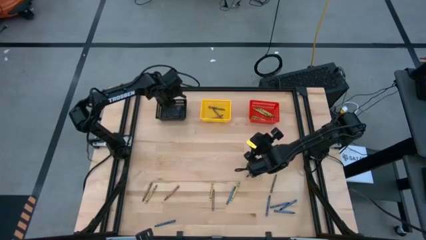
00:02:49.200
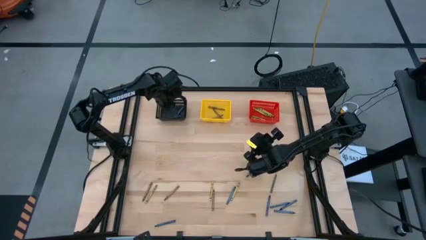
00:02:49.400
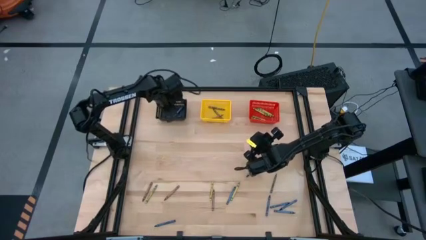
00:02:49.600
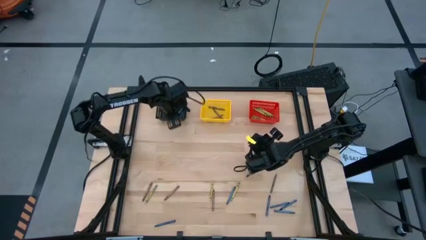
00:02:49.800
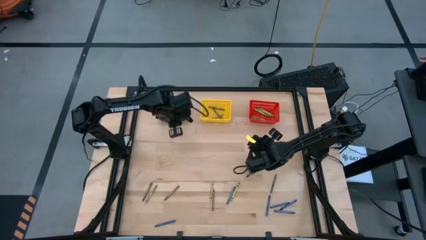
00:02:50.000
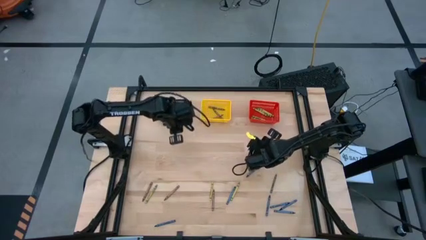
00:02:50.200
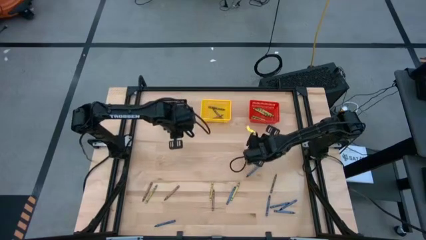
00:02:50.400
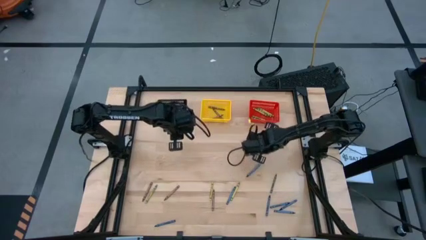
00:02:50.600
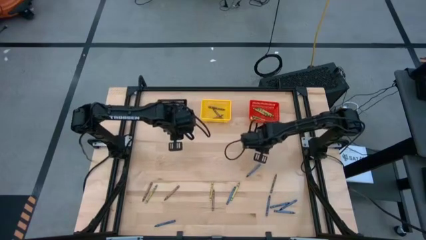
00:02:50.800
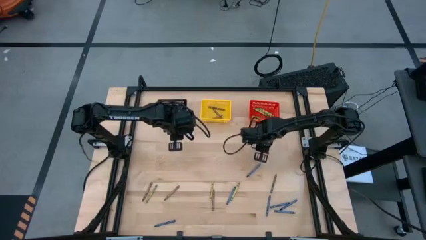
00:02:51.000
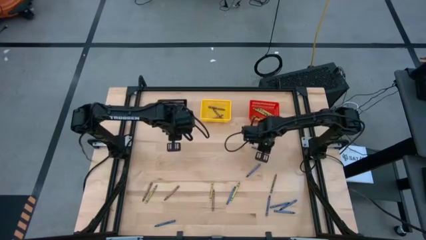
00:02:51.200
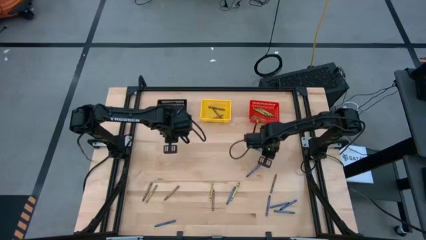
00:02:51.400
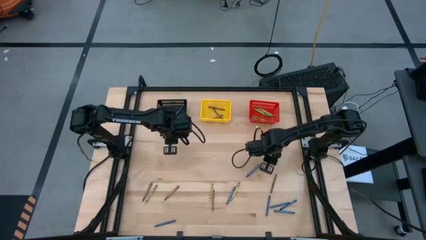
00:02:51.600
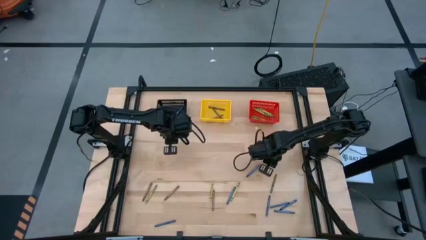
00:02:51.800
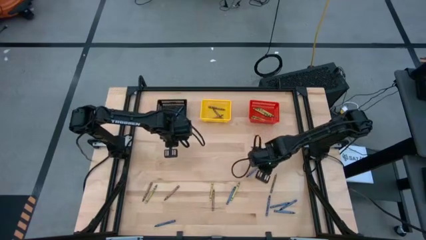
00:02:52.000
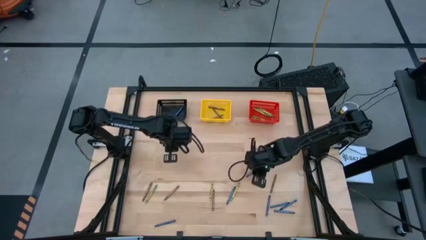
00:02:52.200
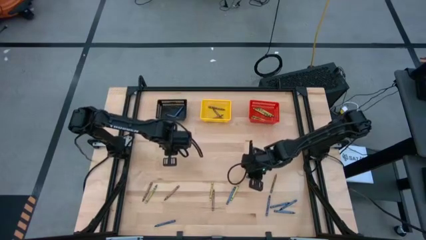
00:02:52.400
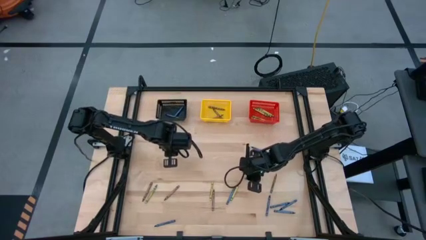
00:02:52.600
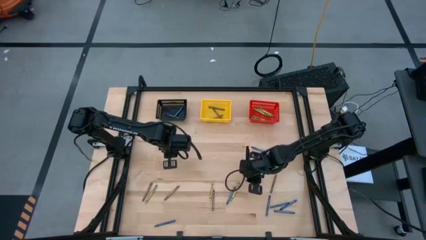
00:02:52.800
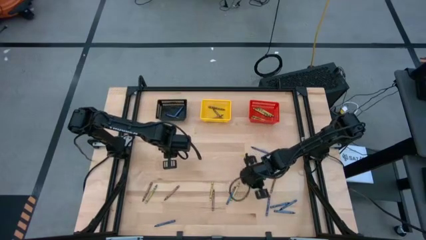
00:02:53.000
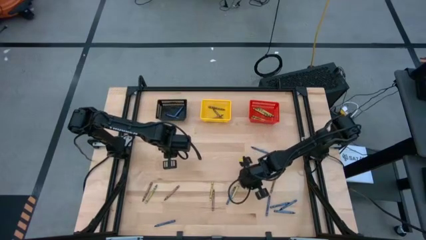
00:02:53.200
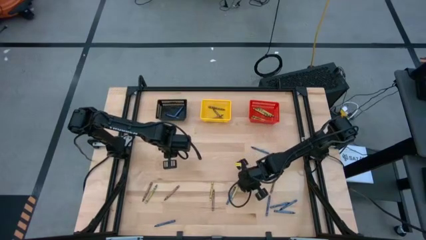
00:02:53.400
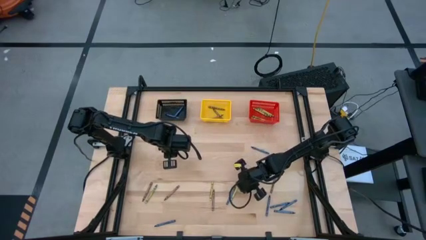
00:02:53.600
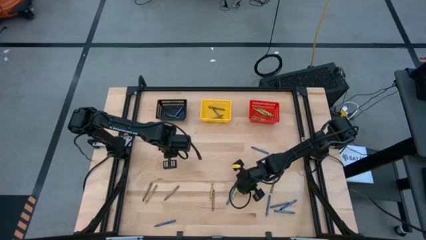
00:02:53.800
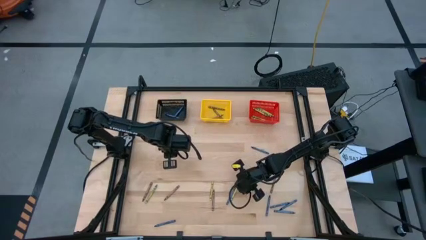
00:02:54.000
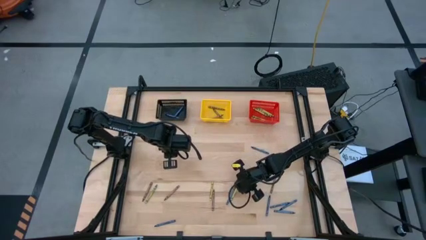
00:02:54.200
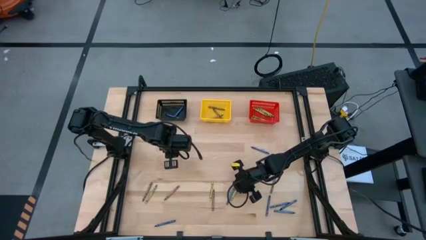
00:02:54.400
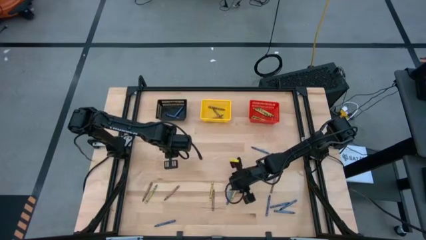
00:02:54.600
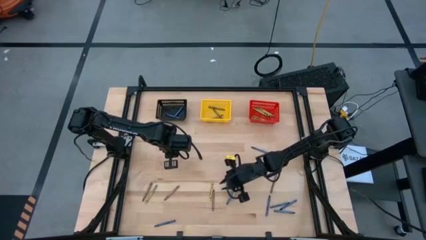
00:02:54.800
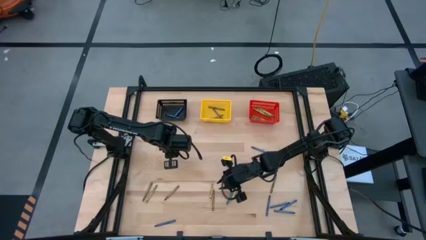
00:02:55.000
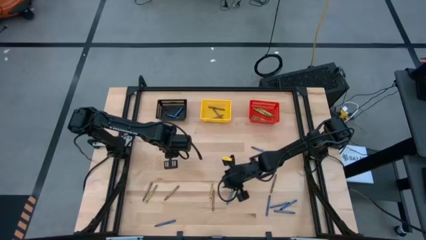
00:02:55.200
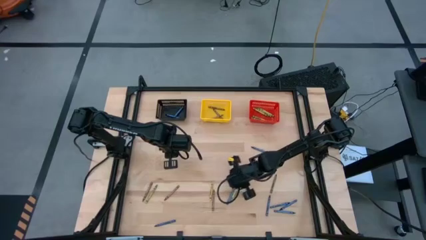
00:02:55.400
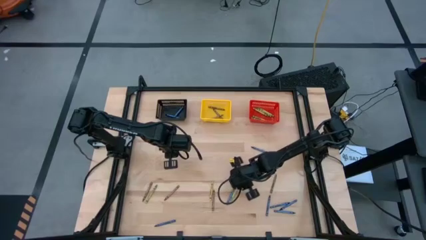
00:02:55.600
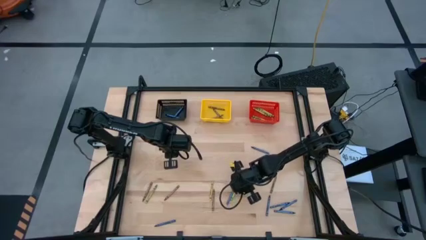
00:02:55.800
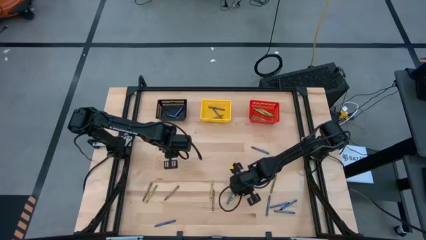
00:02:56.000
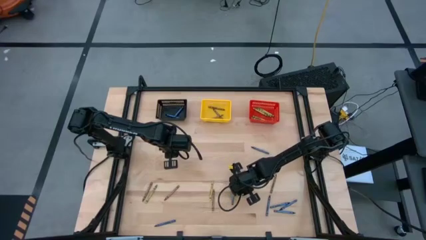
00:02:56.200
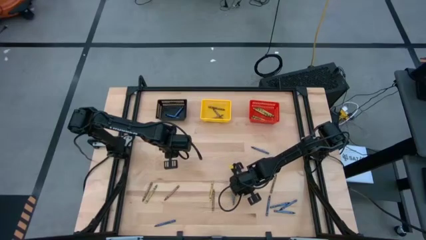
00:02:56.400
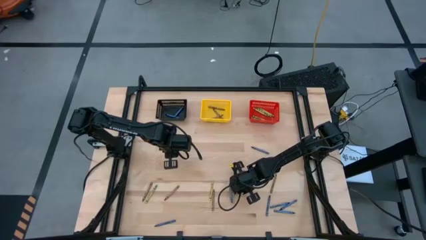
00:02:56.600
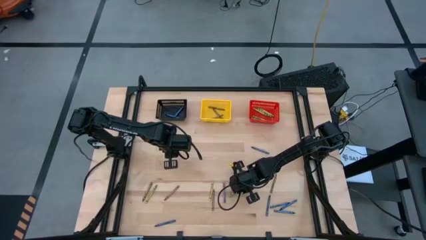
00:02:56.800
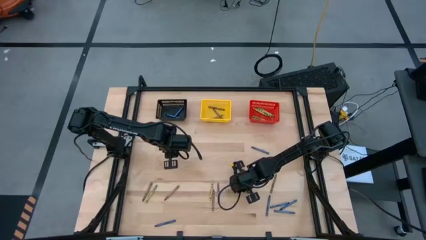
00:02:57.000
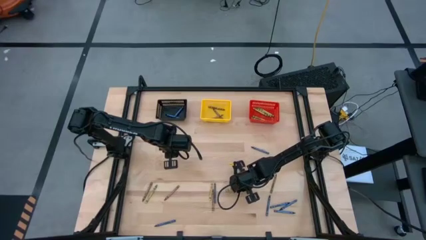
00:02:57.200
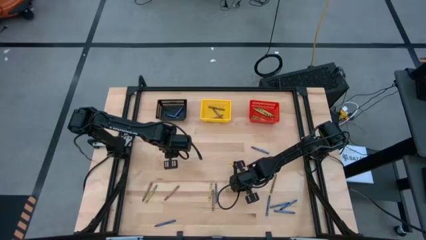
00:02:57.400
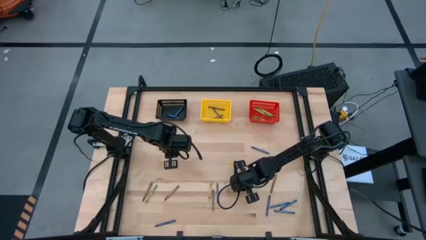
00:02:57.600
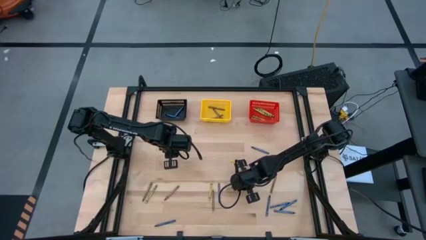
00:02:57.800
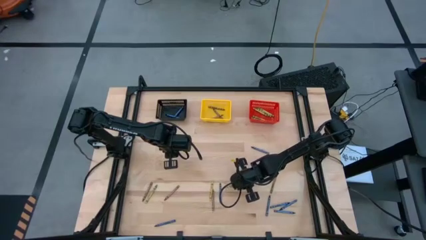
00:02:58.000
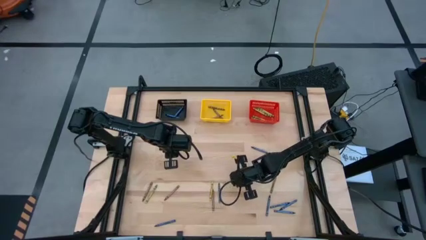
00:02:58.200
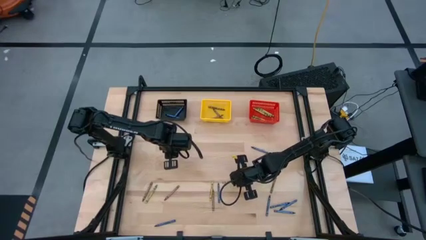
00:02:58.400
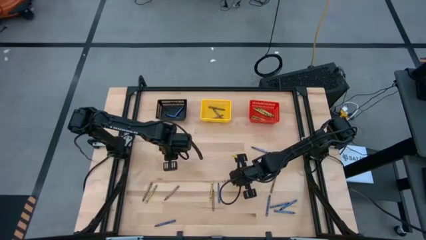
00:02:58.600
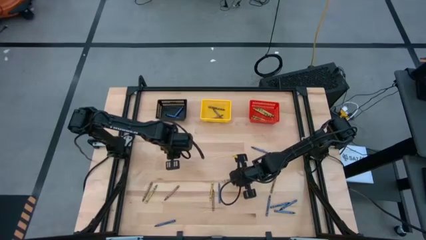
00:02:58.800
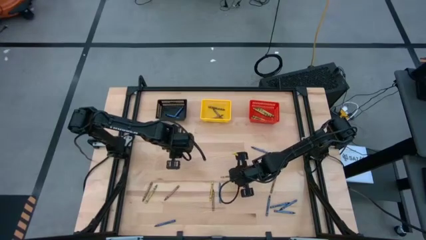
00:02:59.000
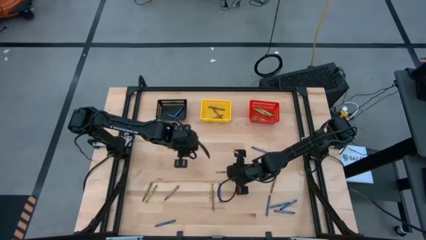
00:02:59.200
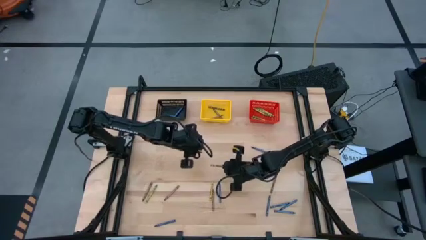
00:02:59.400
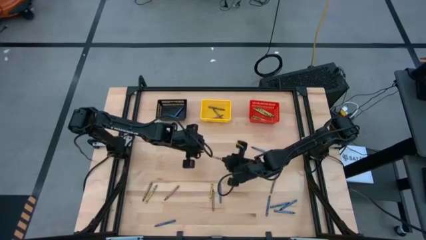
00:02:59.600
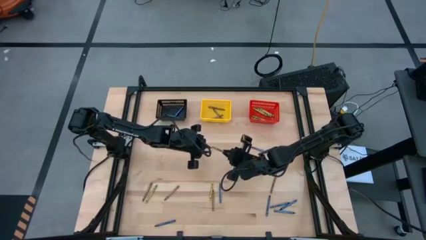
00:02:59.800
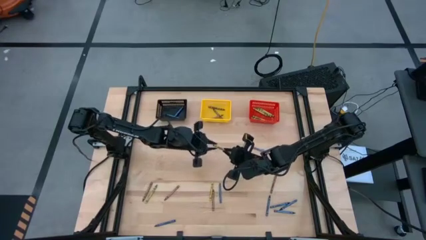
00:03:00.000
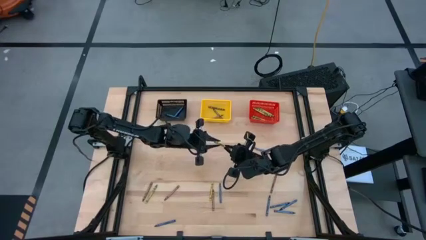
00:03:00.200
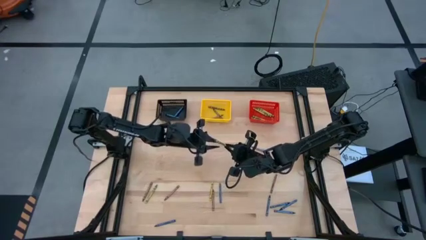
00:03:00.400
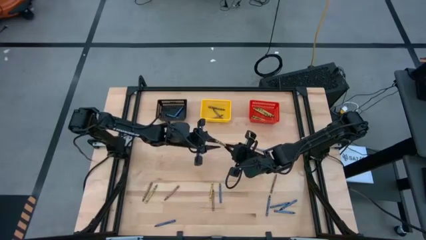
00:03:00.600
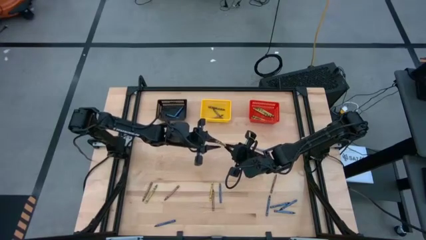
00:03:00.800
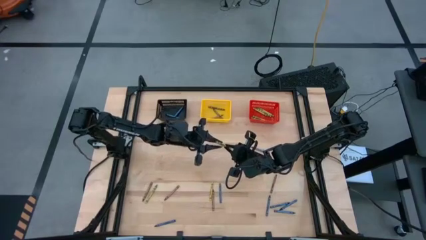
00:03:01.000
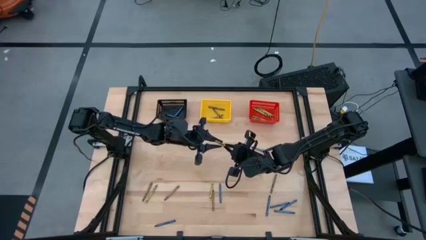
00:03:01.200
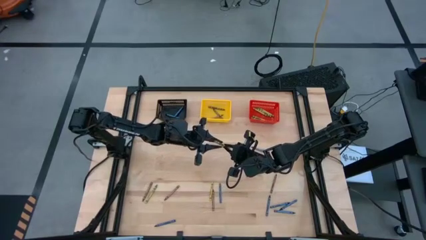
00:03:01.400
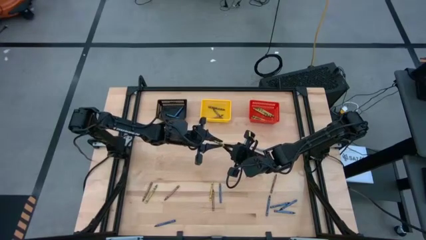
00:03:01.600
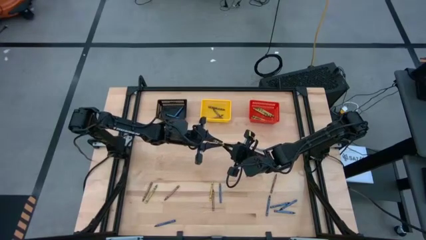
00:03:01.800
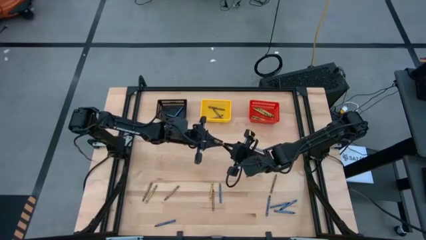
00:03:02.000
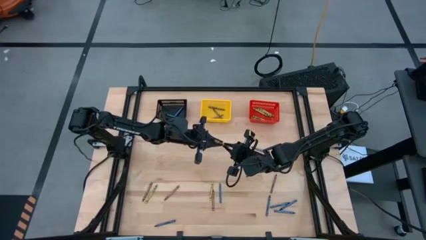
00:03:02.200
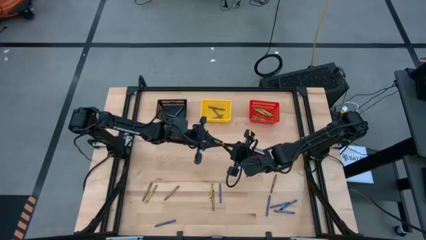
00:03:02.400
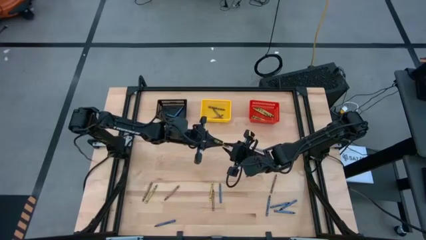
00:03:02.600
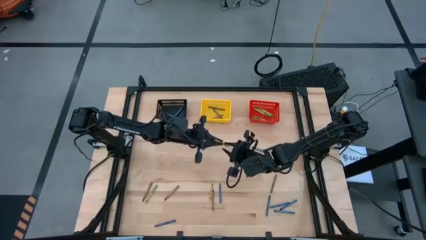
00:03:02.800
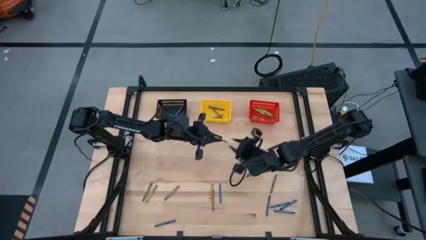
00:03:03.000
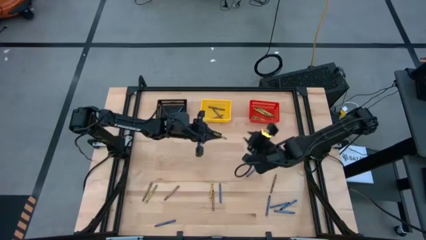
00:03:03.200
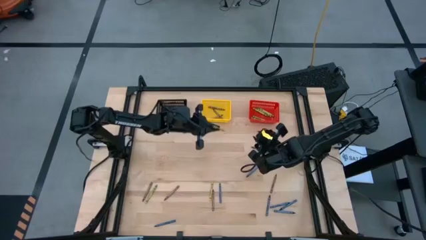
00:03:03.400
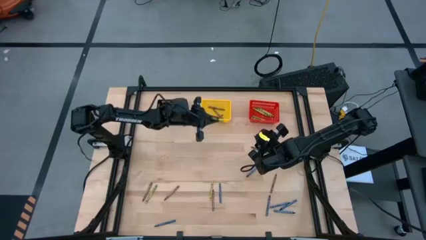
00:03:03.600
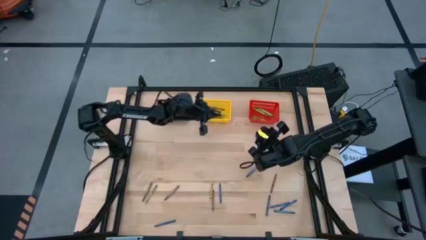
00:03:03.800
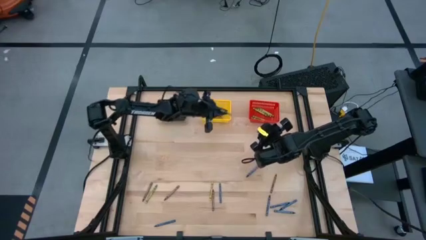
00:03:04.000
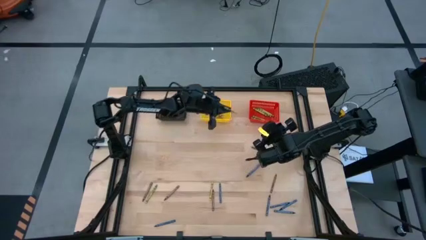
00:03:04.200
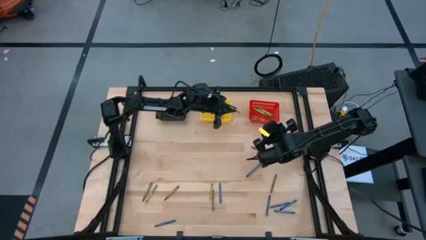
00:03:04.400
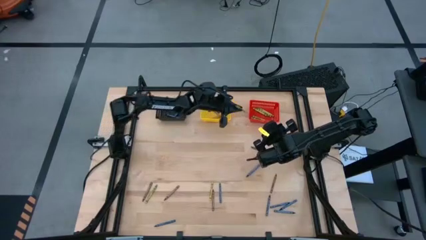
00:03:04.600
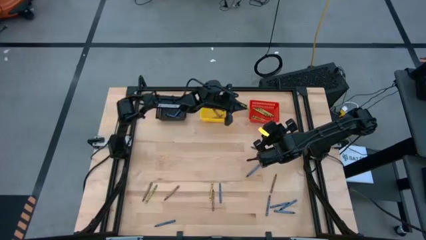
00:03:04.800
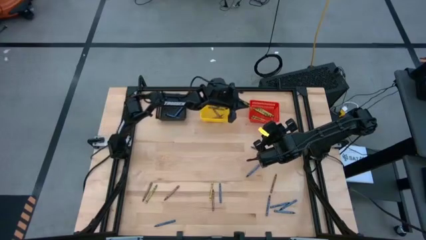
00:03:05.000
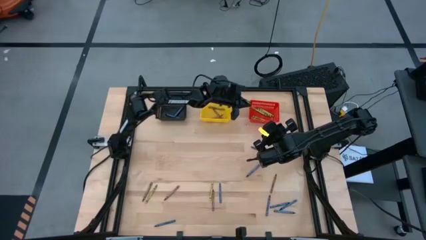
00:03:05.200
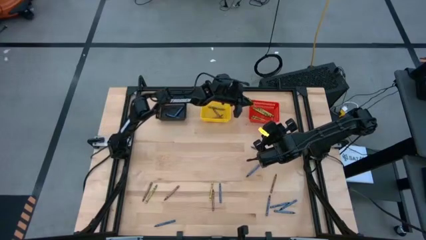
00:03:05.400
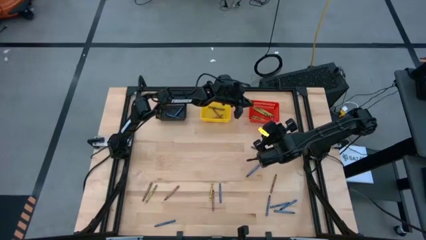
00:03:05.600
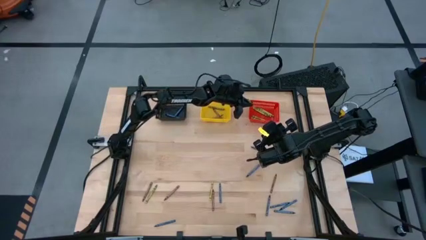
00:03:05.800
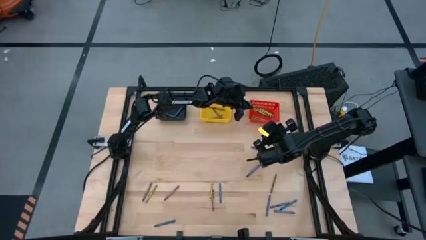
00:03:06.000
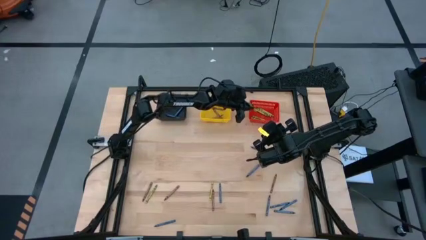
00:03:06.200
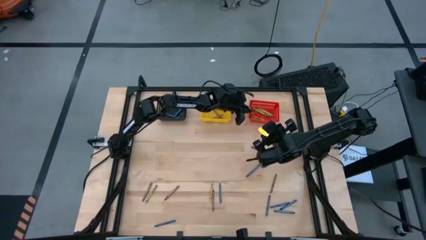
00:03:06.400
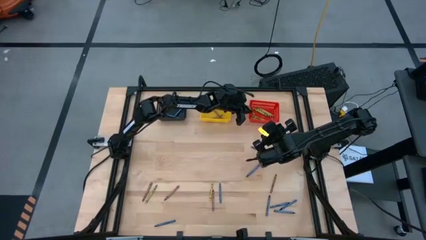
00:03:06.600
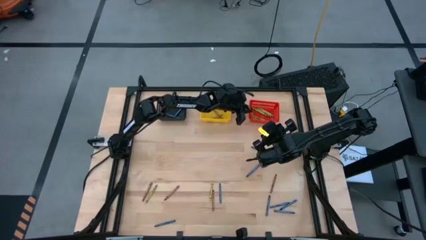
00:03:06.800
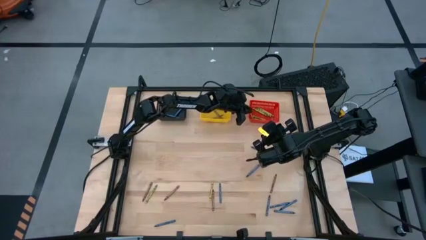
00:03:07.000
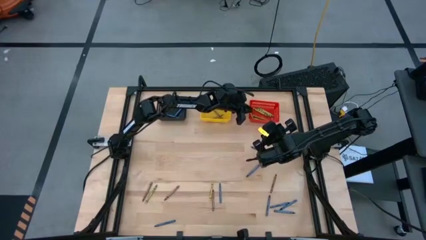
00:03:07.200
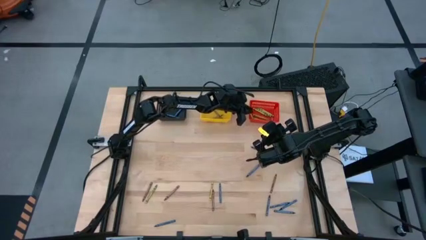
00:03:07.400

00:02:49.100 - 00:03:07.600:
Task: Sort crayons
Put the right green crayon into the red bin
